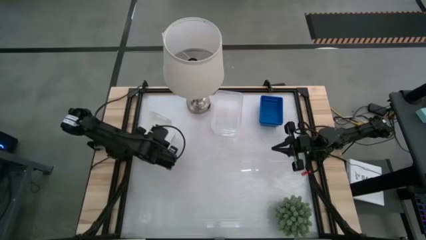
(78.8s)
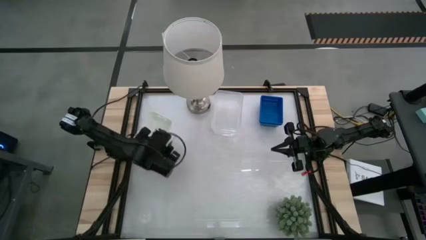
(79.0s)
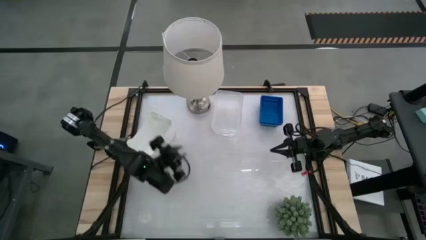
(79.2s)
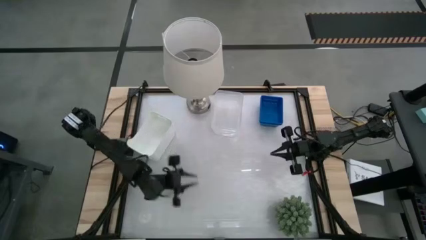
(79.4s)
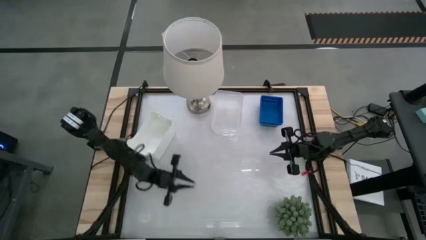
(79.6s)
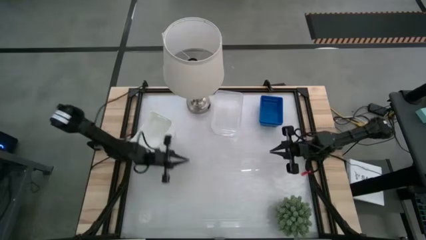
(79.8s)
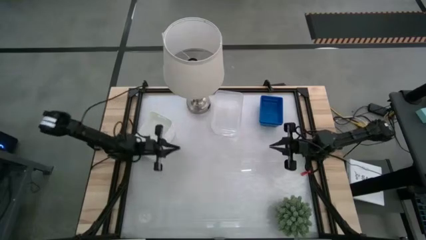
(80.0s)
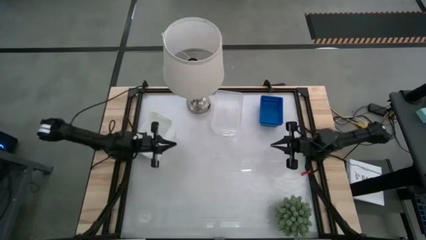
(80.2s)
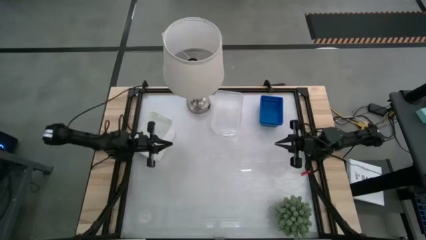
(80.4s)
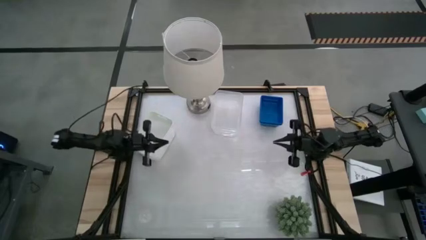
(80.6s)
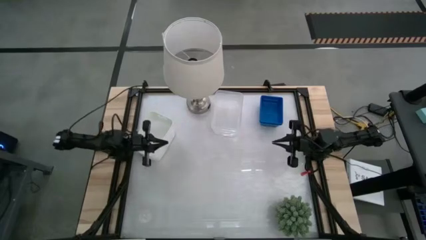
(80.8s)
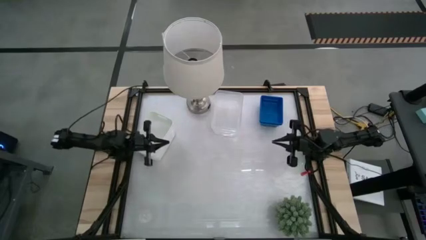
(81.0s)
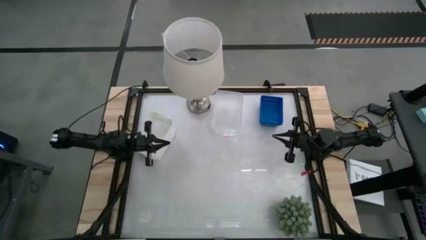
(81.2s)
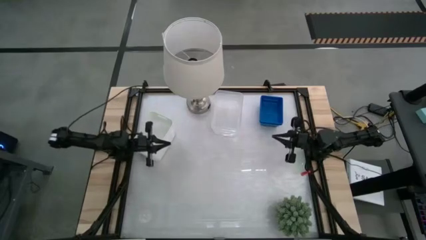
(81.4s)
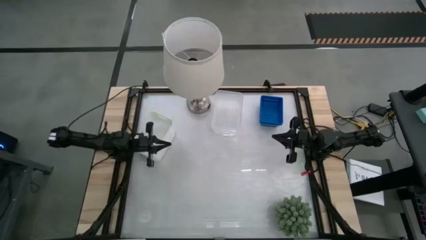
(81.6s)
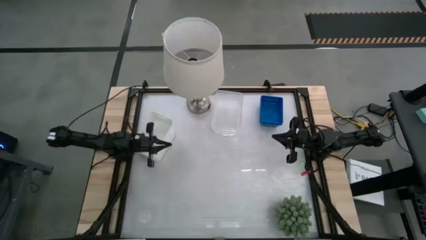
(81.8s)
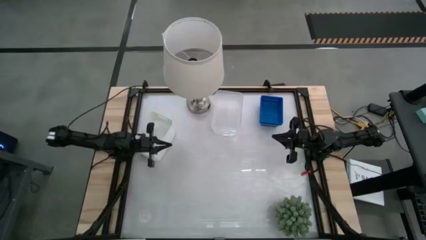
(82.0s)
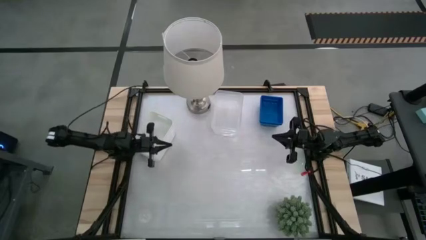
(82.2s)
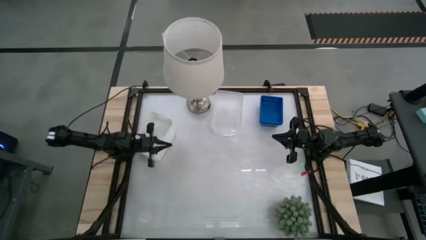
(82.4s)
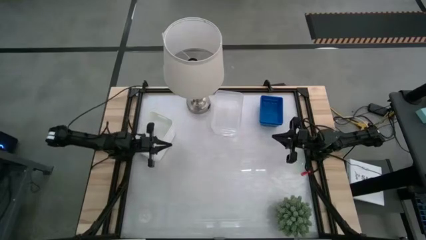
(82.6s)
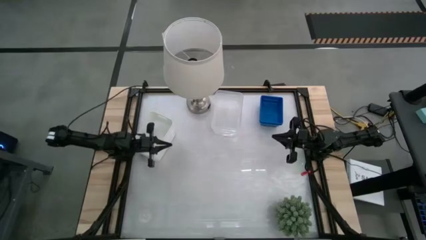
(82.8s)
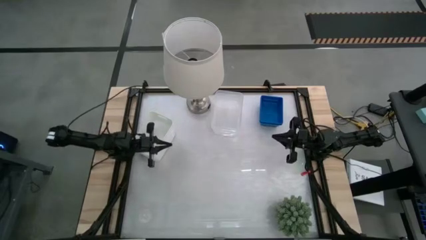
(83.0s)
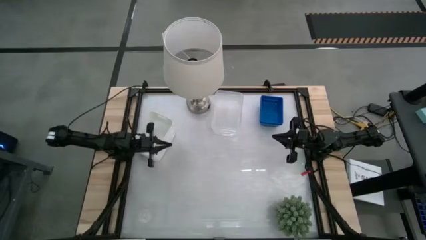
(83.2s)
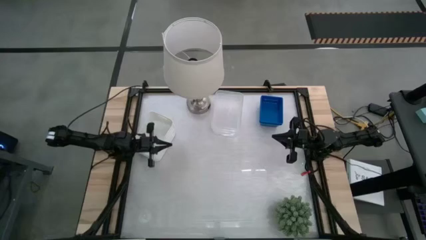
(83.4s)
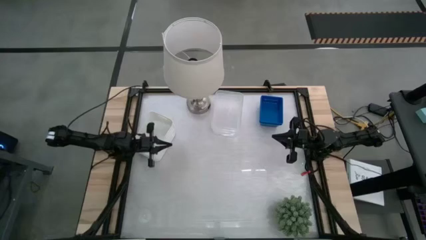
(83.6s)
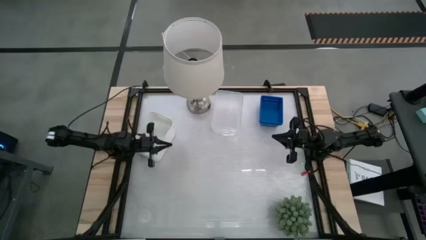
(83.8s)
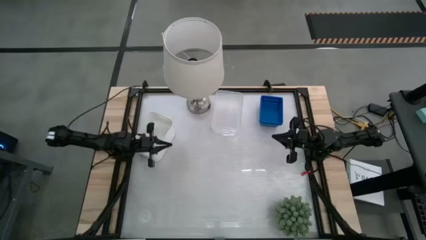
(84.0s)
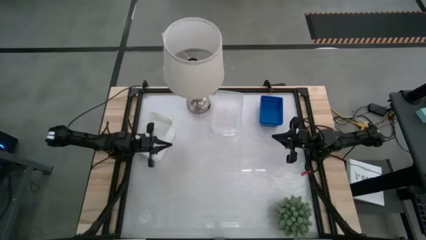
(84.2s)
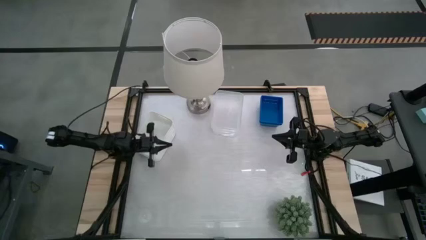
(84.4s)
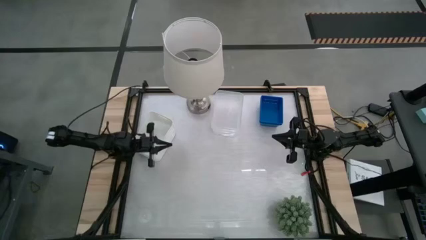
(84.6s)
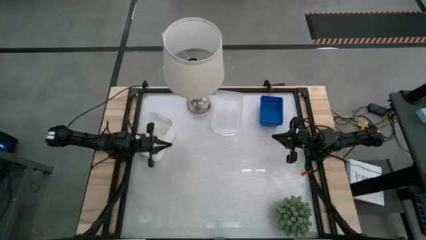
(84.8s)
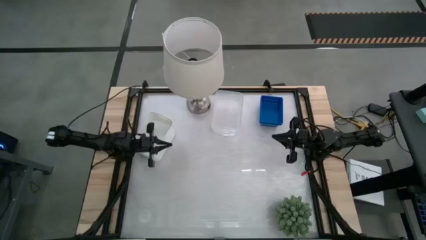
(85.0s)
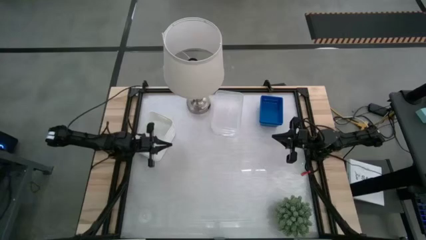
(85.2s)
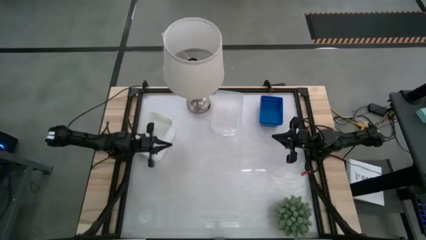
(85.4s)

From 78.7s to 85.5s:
Return to Home Position
